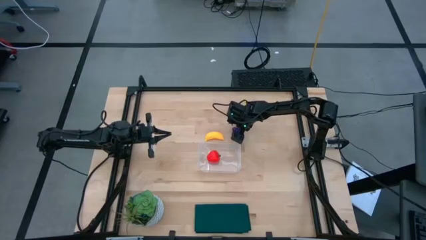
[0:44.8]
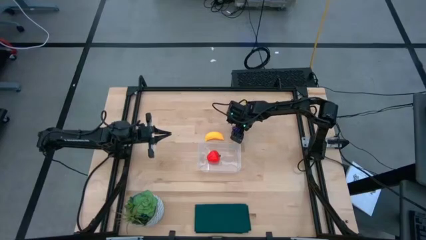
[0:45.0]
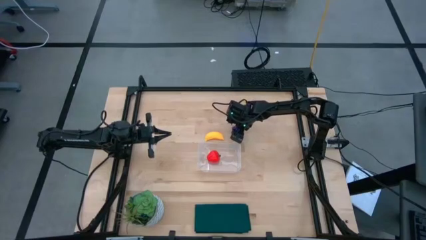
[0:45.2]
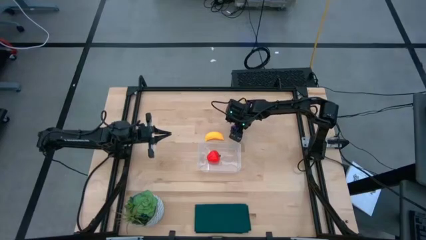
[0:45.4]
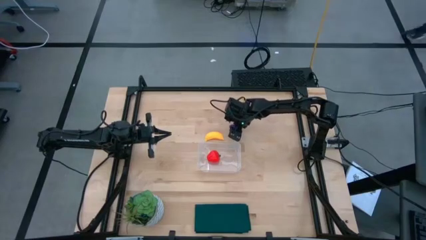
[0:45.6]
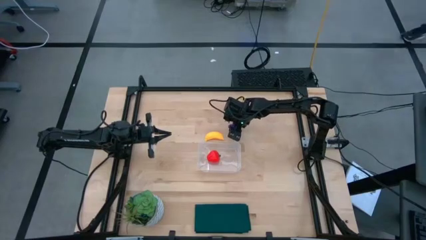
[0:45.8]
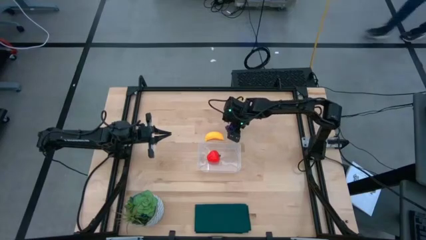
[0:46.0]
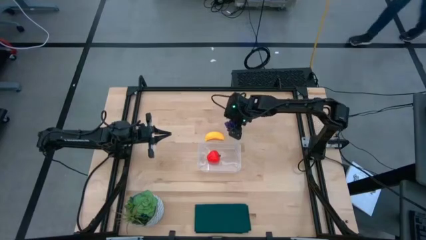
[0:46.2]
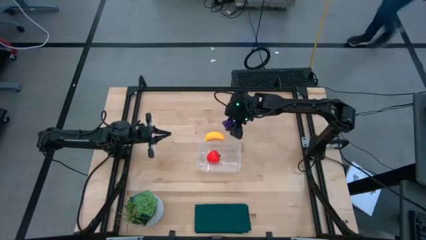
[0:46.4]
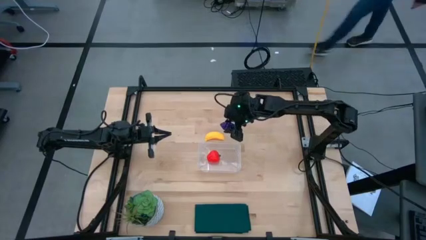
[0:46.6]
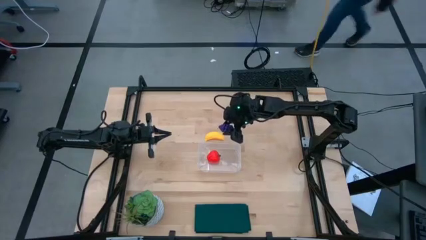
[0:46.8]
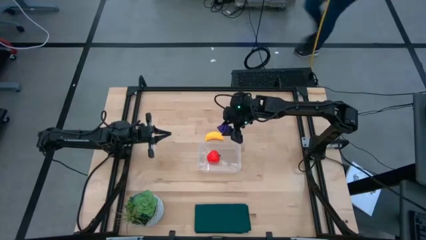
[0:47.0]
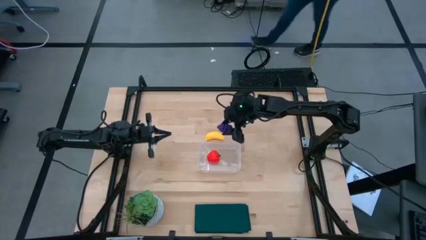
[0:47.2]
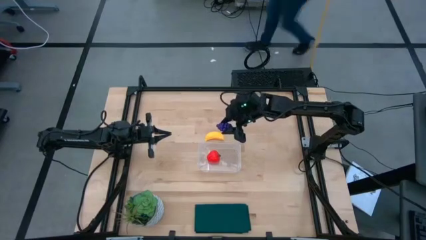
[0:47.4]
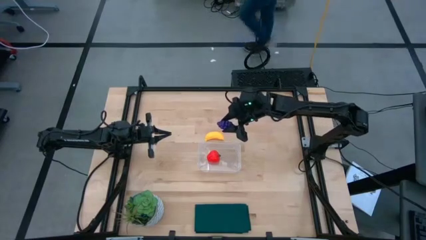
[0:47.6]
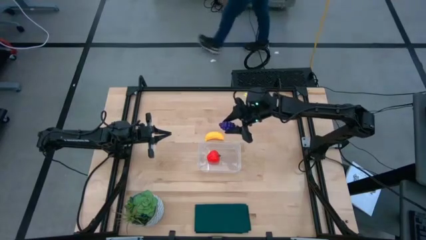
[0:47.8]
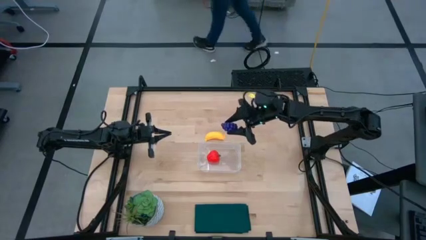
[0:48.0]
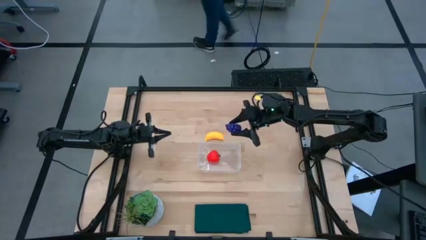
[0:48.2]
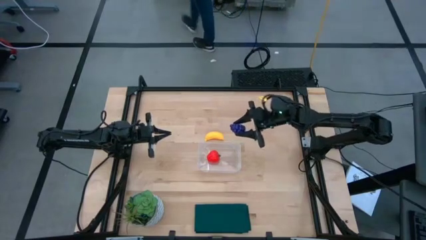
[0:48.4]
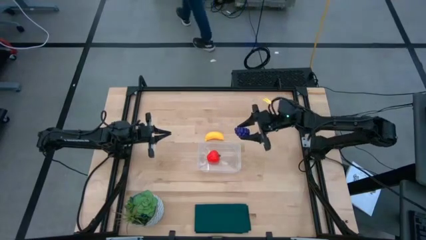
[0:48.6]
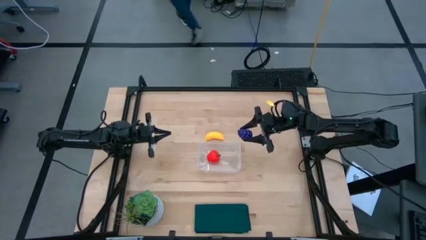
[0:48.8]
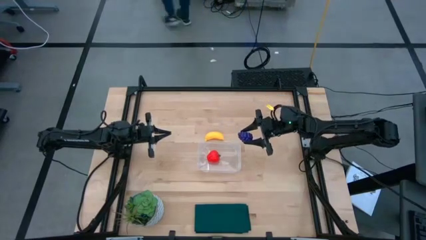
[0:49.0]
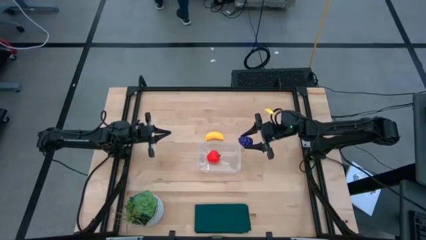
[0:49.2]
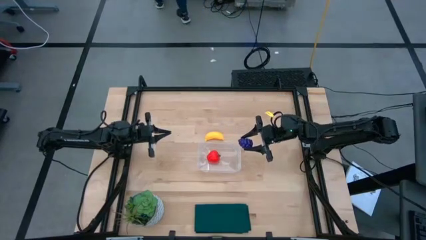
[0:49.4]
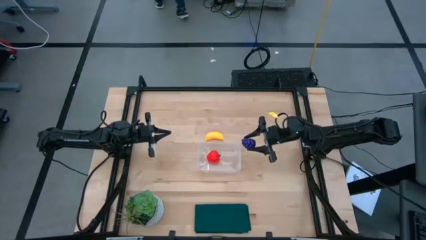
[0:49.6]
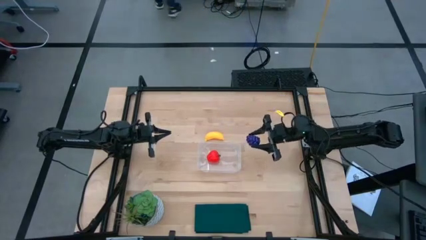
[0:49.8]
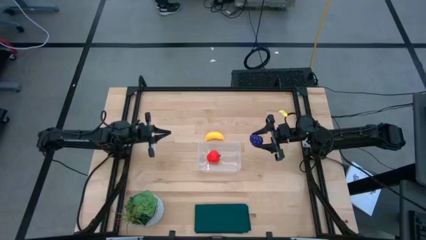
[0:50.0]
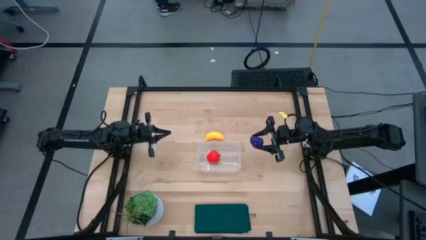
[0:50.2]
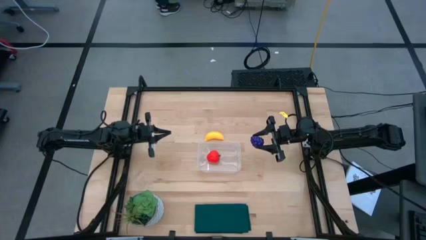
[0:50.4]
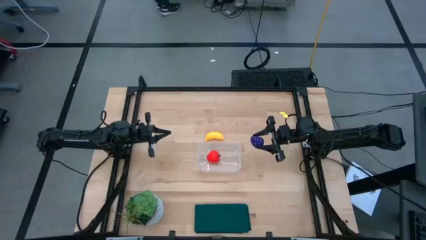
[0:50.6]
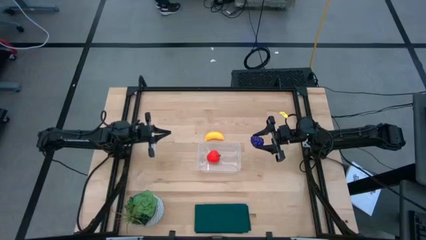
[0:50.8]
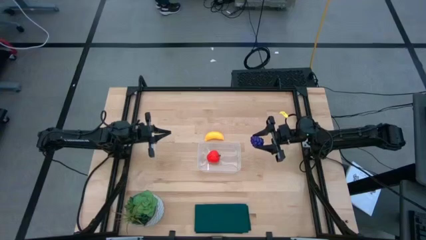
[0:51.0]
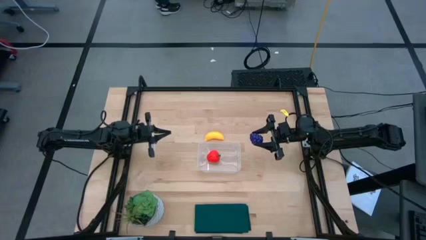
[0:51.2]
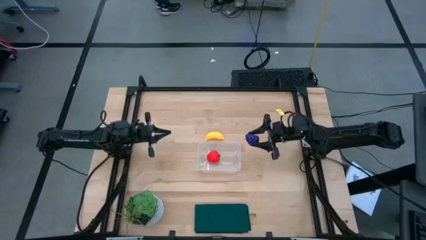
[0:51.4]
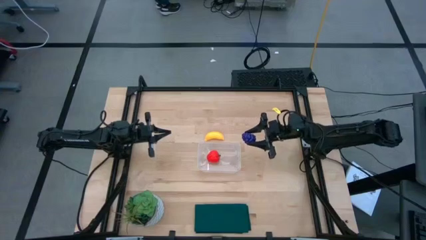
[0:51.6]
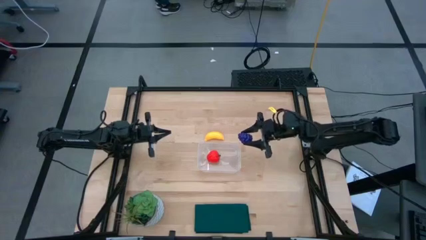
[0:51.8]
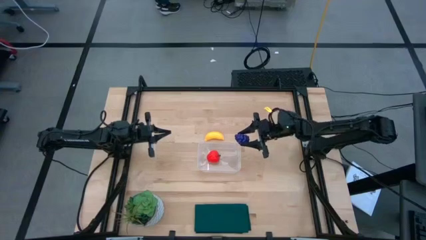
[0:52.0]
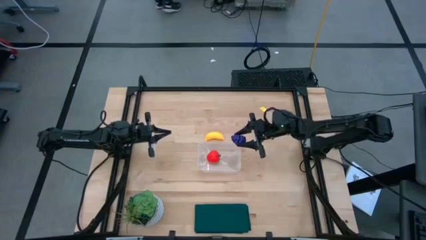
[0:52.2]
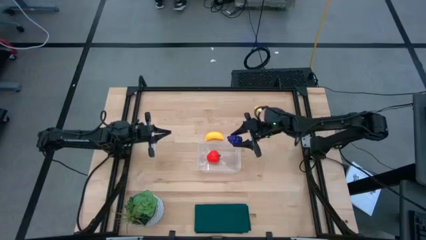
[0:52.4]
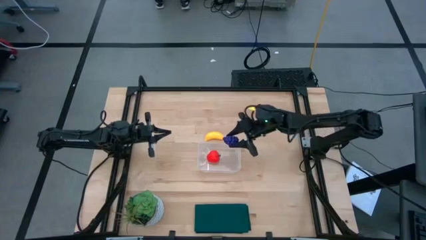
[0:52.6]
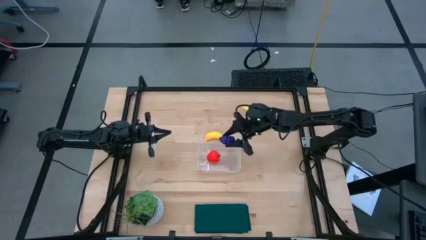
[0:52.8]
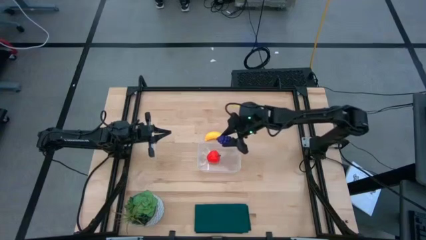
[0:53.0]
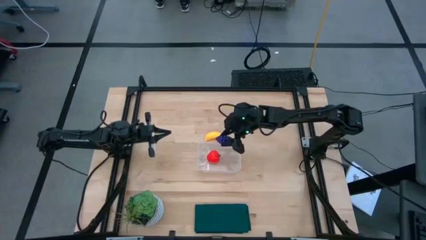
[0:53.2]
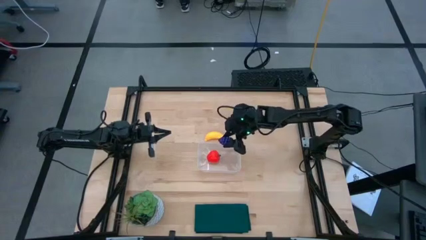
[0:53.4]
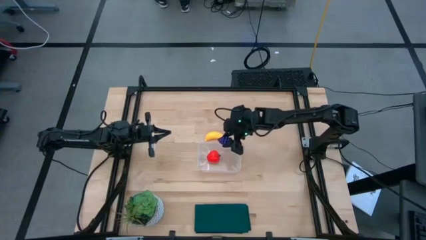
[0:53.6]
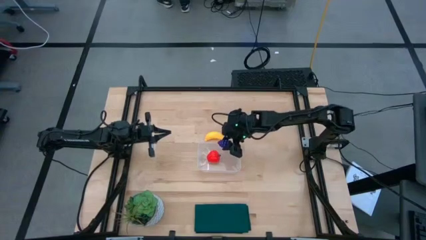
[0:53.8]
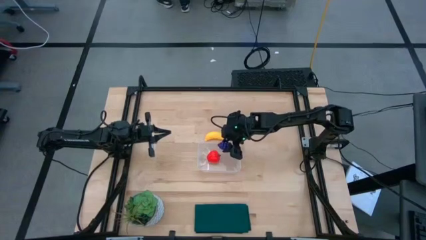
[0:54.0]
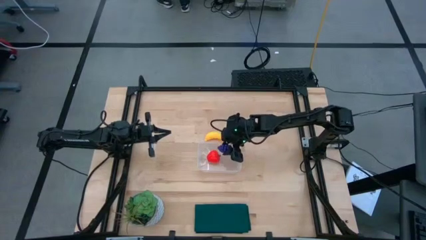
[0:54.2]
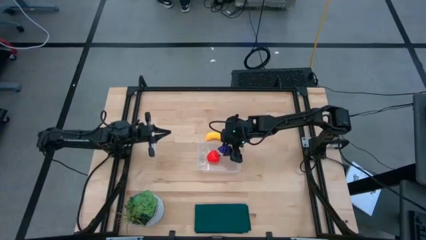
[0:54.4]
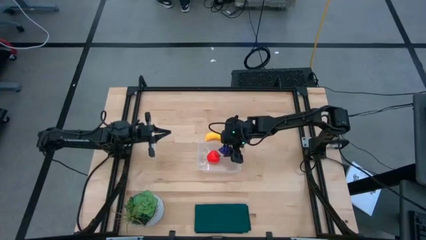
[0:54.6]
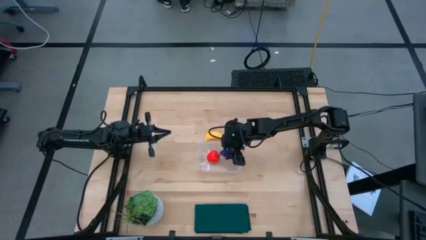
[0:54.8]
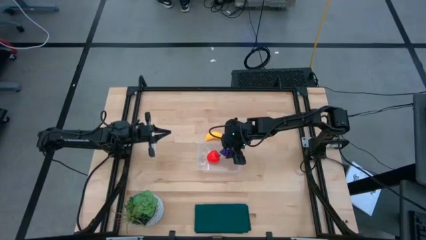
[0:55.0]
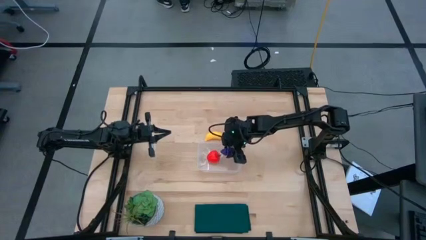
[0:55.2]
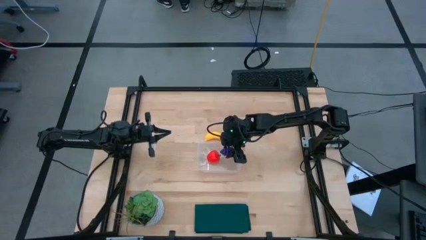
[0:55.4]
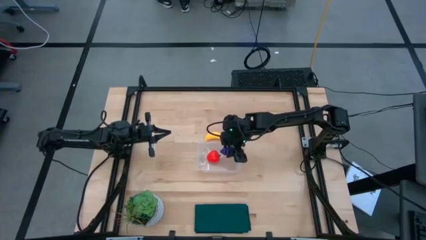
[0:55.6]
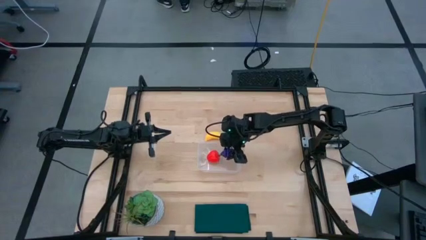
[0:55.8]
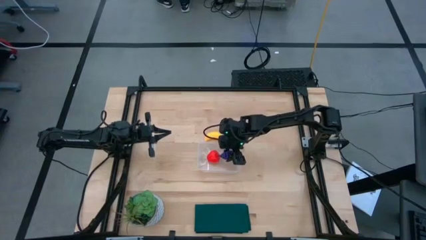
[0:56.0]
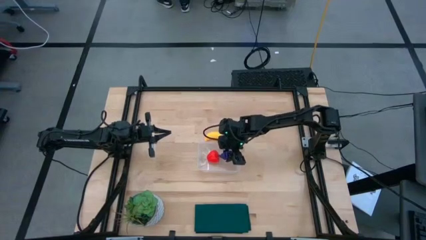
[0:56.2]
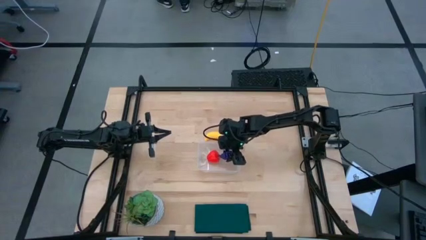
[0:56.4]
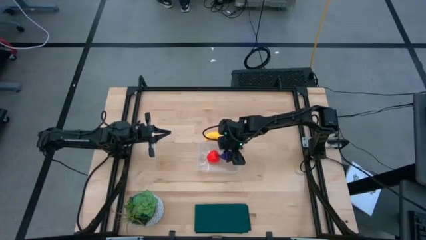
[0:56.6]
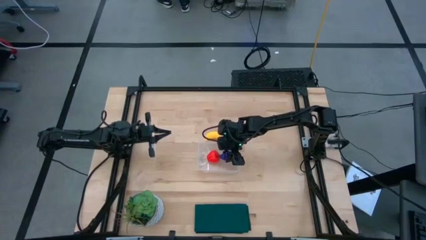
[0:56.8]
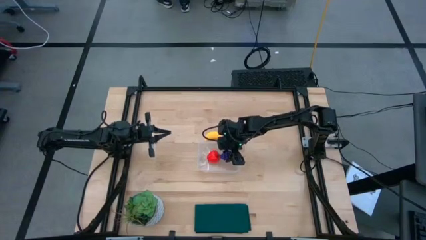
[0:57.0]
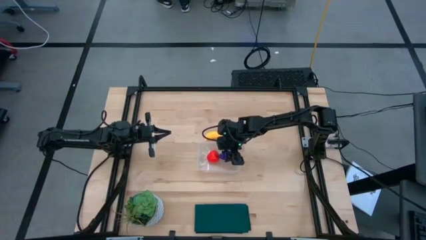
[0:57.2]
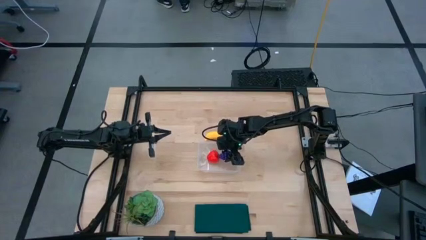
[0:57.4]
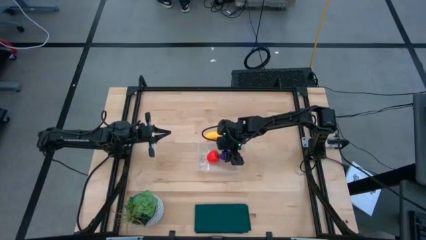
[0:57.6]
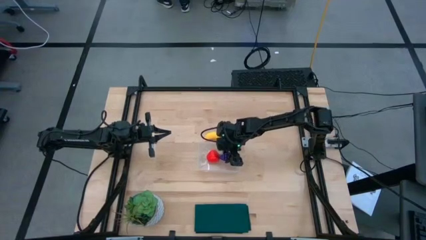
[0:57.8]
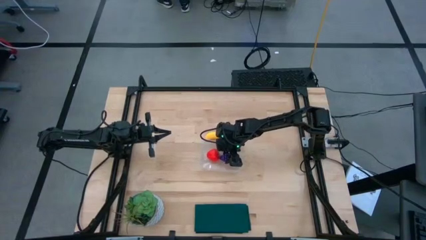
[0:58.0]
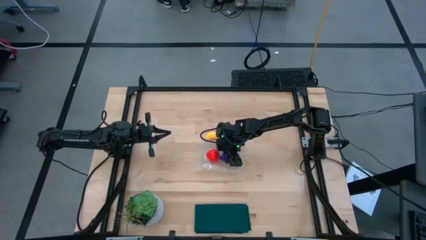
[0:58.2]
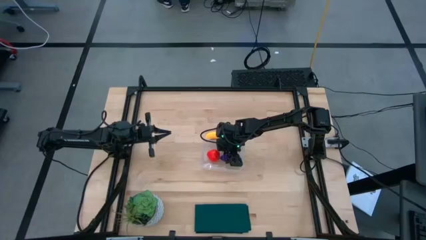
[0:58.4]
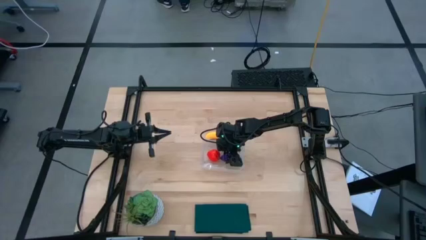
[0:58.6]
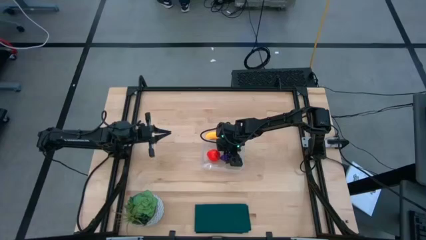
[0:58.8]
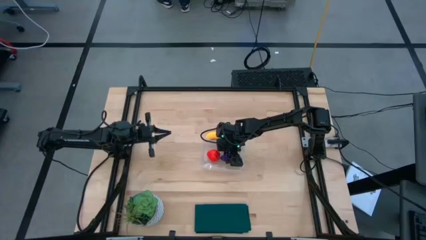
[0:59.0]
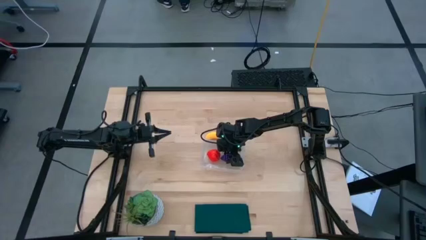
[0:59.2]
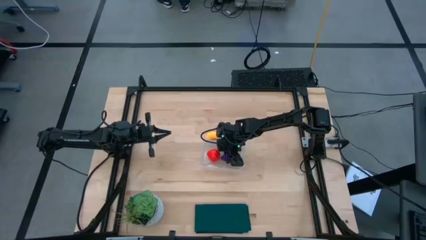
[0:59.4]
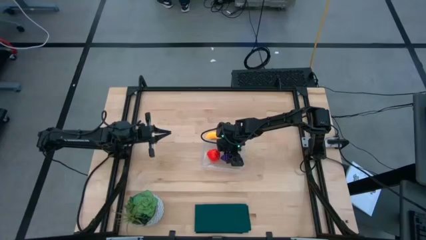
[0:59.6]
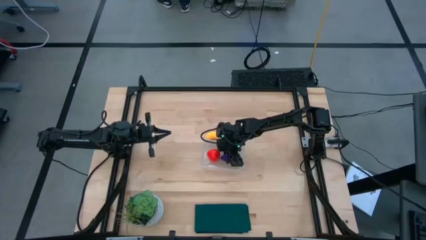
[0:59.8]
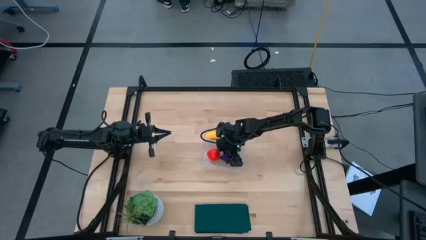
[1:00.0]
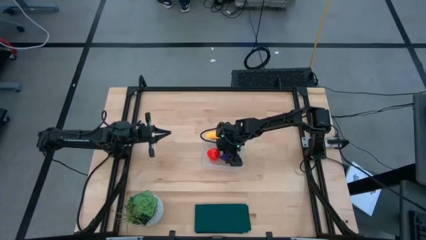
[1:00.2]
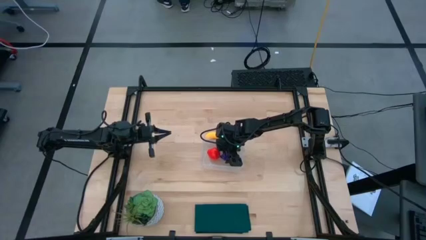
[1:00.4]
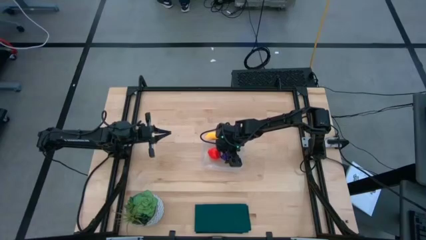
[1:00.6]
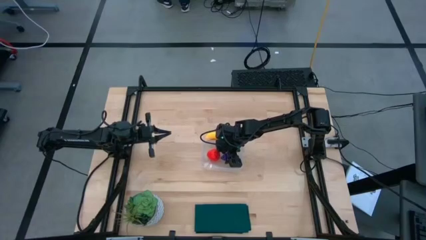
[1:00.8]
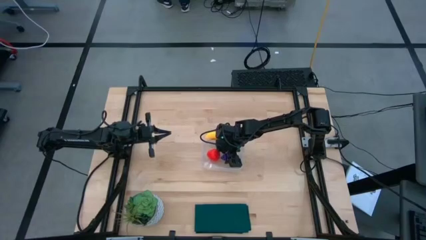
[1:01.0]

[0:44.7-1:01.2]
Task: Pick and placing Produce into tupperware
Put the grapes into the transparent bin
